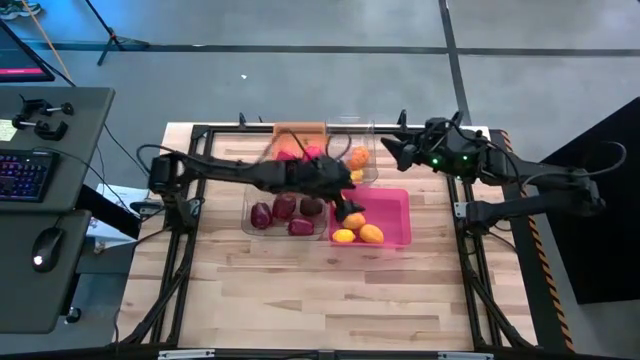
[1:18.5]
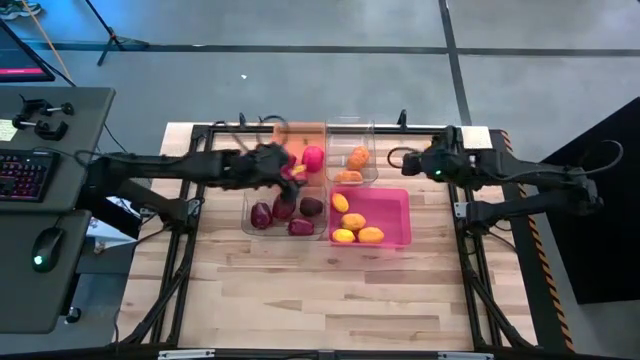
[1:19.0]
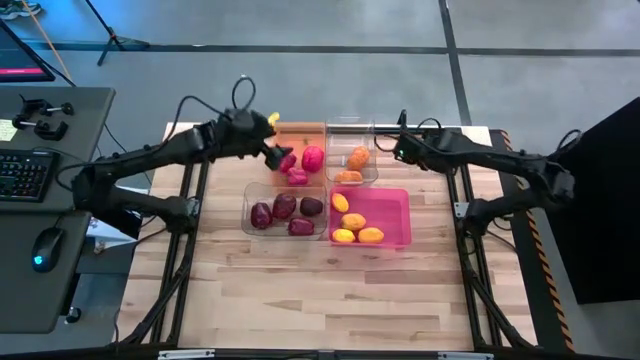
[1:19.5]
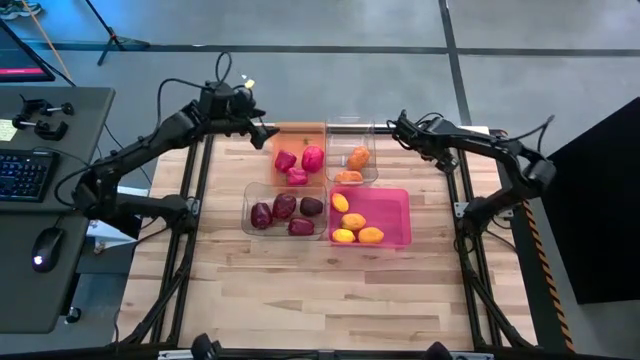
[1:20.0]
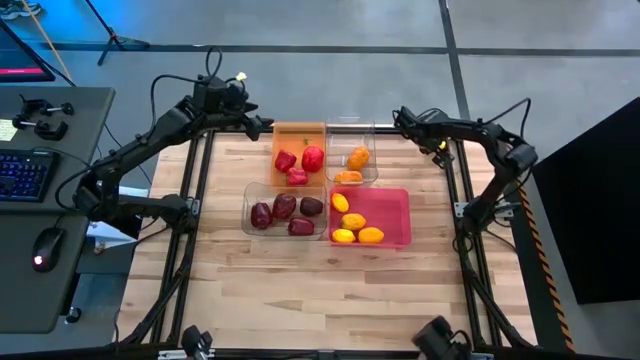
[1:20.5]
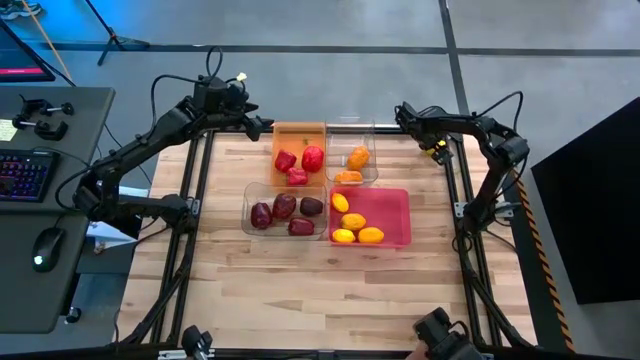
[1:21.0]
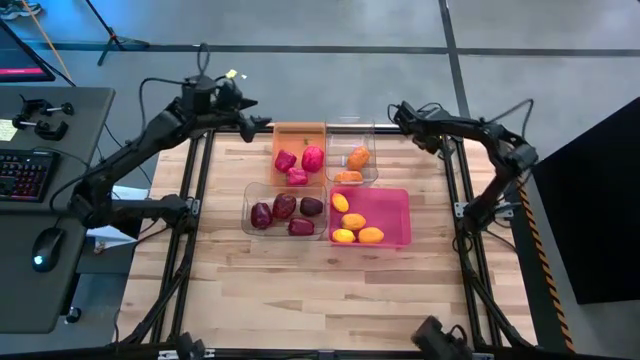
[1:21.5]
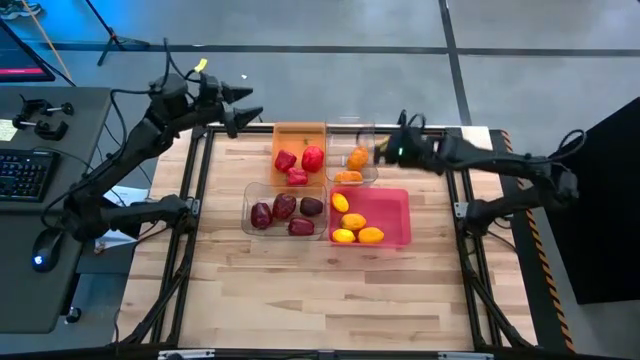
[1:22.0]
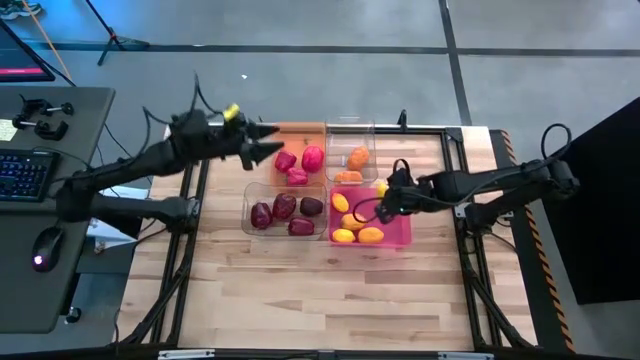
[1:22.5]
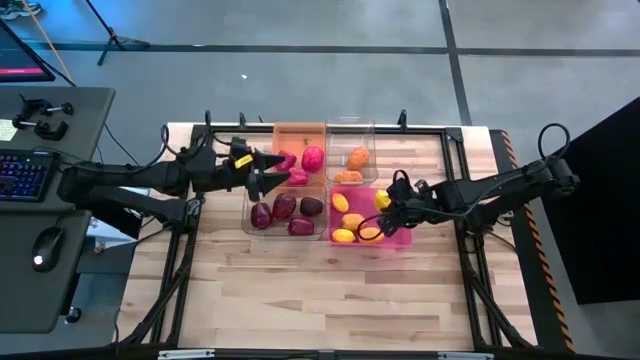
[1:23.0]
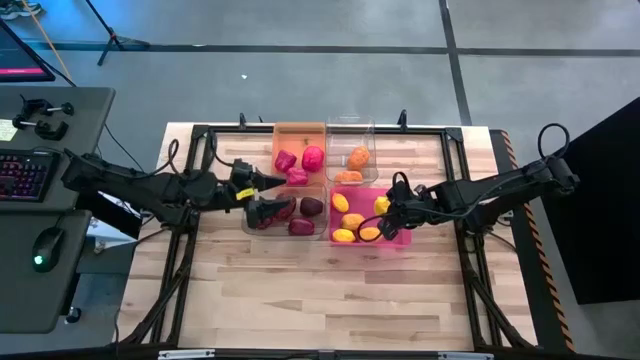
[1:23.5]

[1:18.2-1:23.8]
Task: Sort produce into baskets
Put the lemon into the pink bin

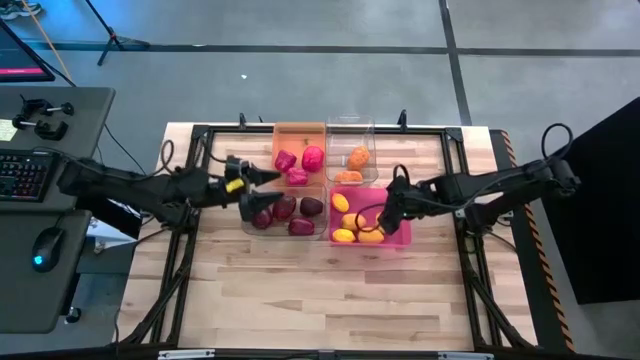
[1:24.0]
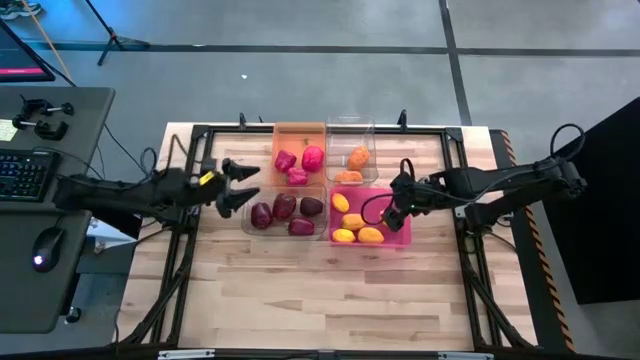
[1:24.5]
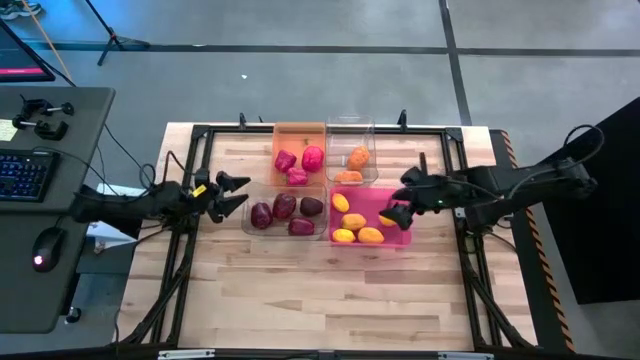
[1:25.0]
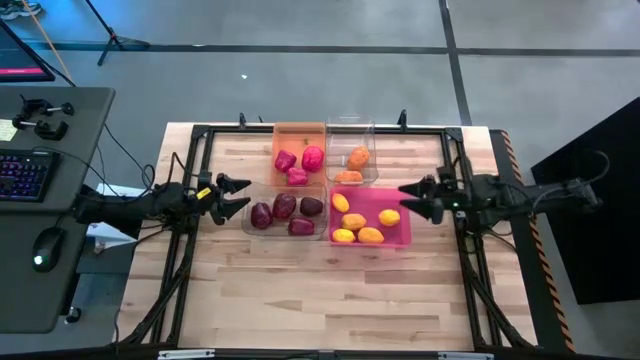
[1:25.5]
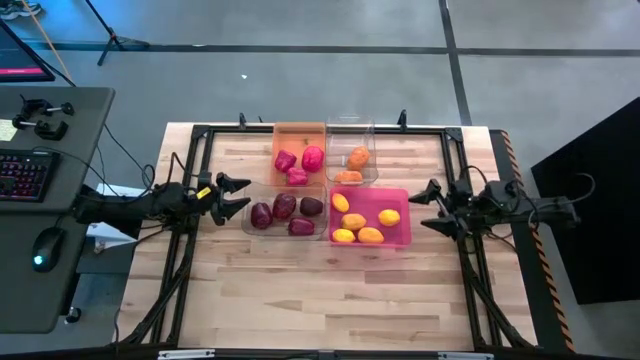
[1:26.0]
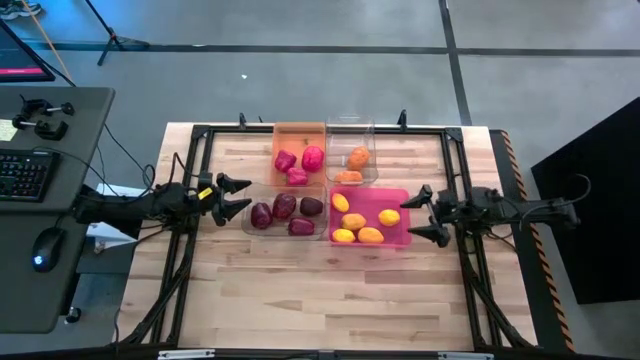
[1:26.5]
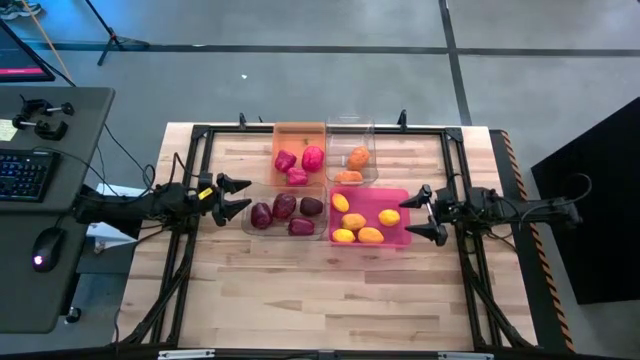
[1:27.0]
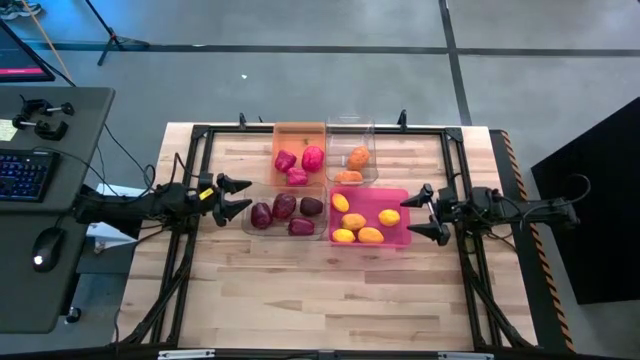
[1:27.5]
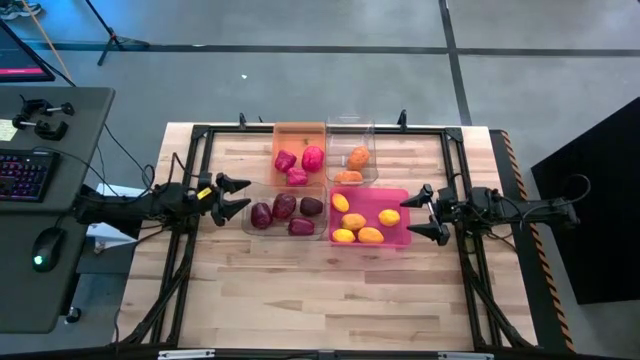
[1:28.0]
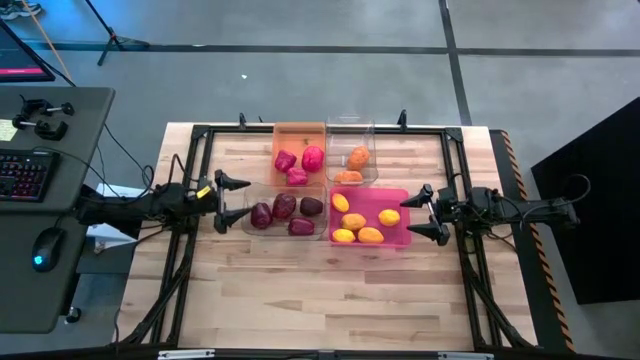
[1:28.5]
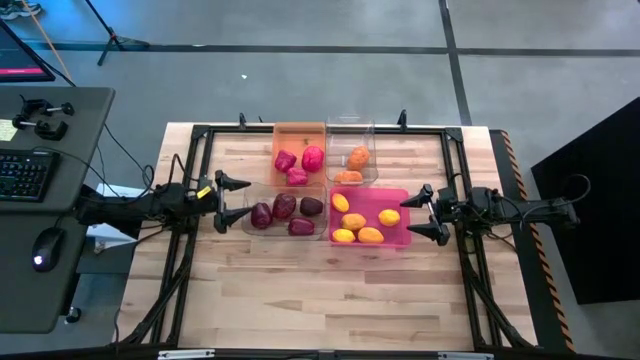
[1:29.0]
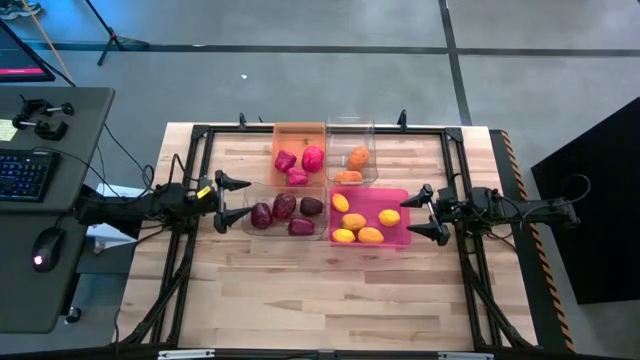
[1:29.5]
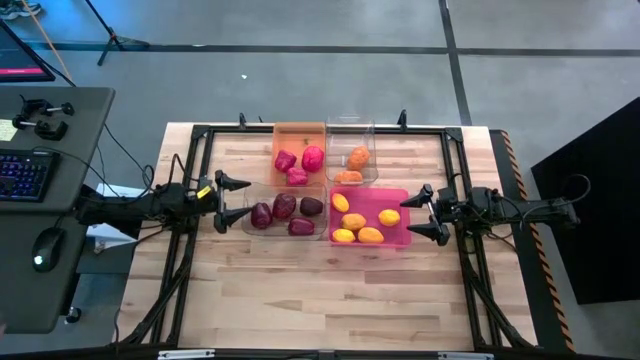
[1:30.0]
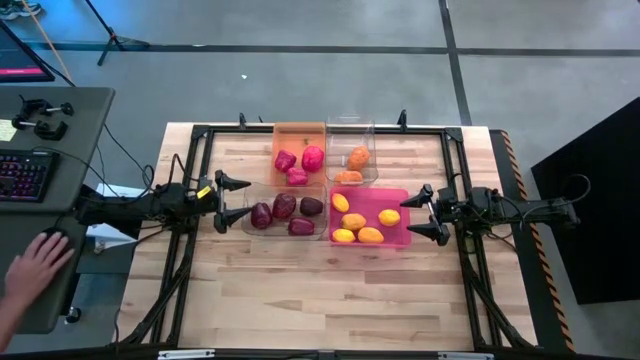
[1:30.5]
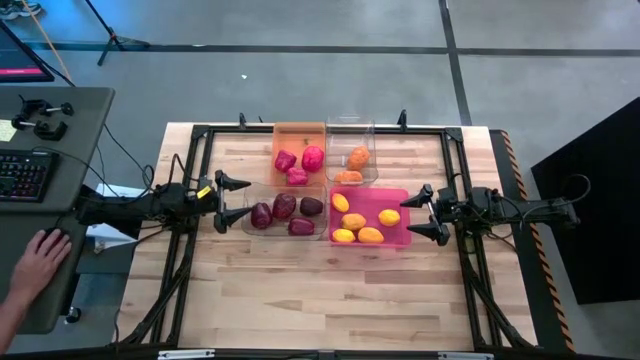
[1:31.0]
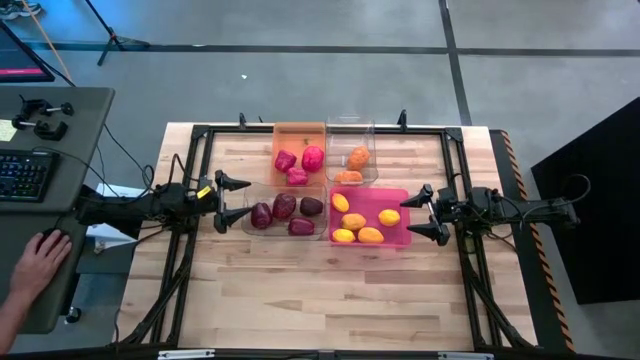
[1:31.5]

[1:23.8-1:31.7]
Return to Home Position

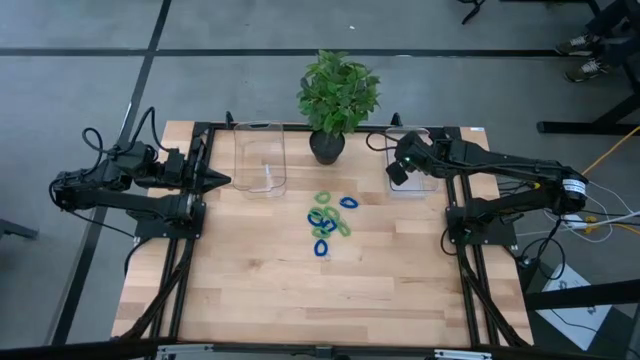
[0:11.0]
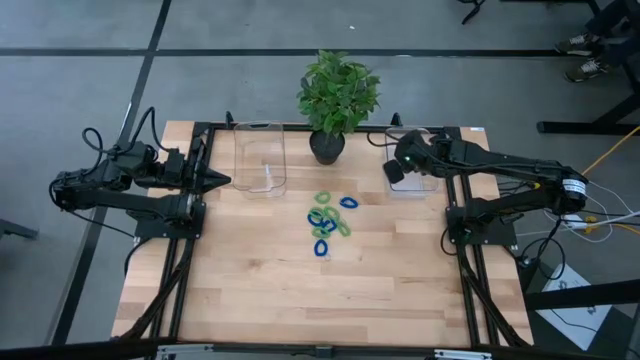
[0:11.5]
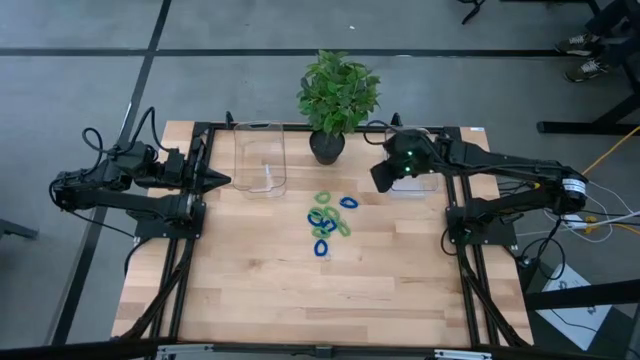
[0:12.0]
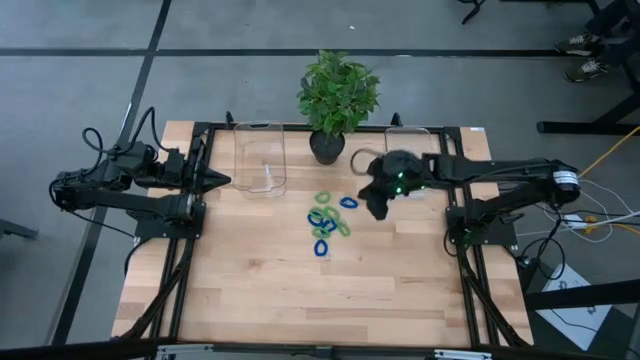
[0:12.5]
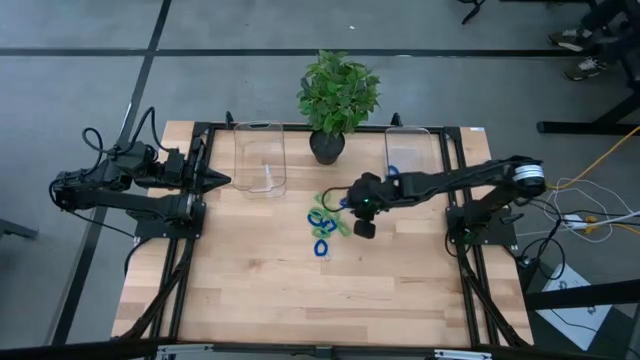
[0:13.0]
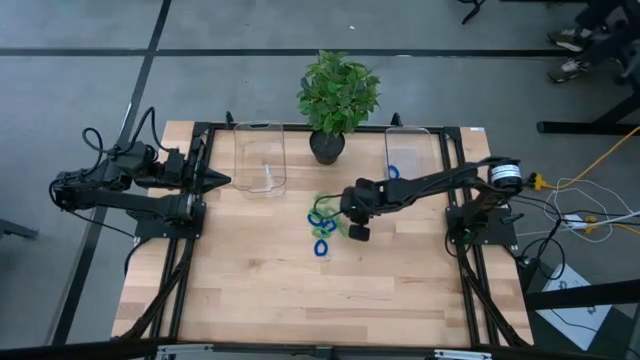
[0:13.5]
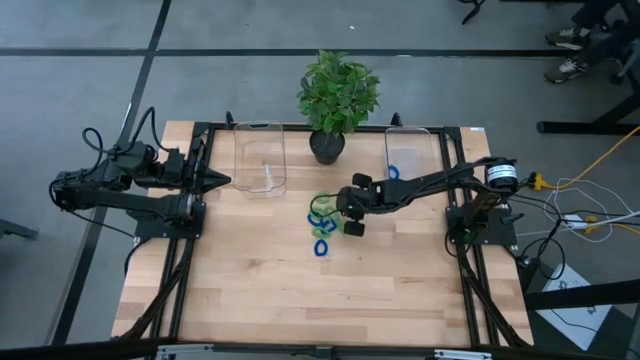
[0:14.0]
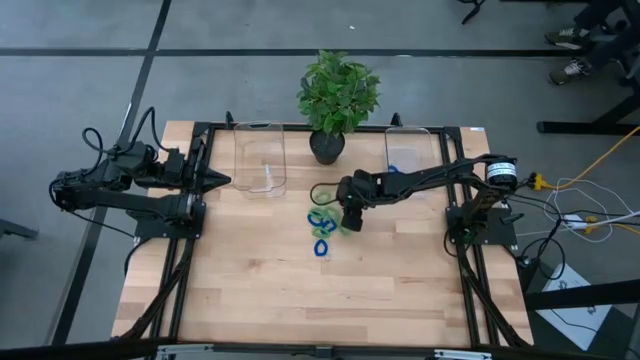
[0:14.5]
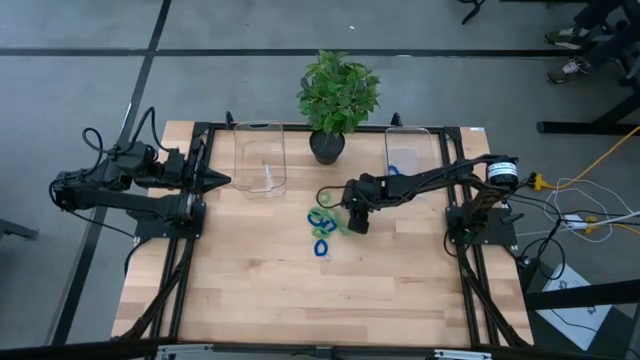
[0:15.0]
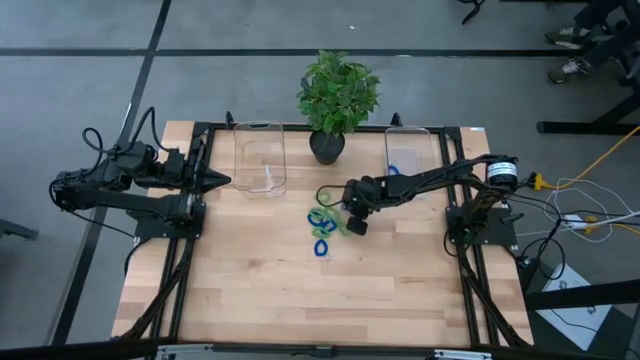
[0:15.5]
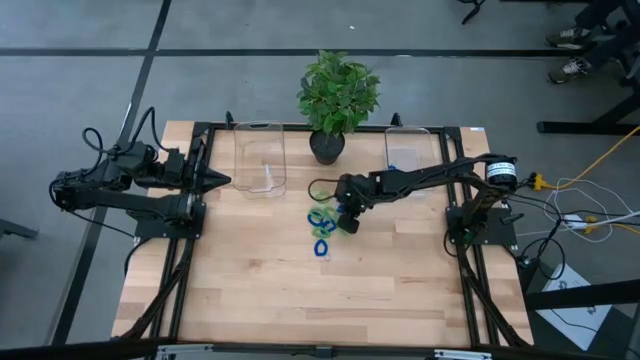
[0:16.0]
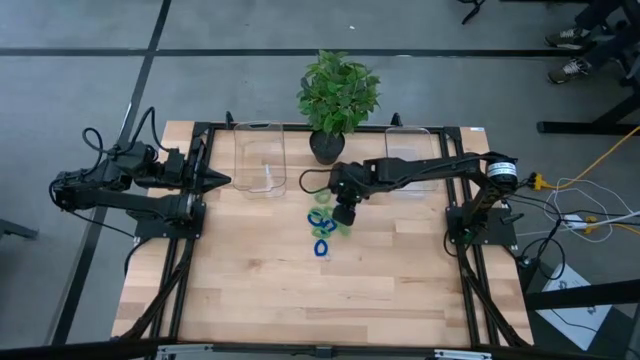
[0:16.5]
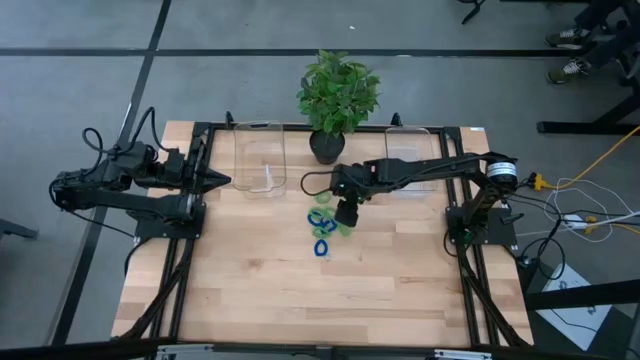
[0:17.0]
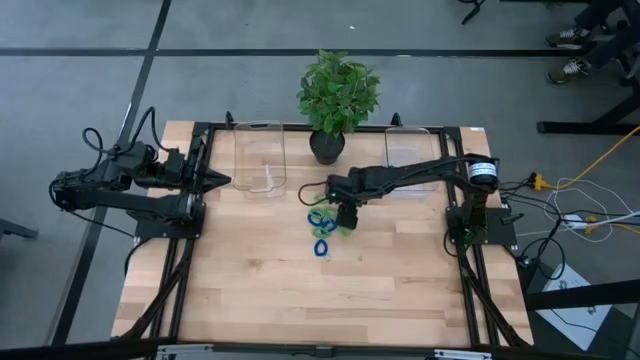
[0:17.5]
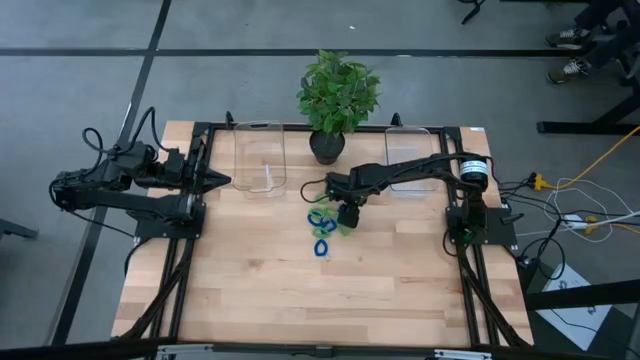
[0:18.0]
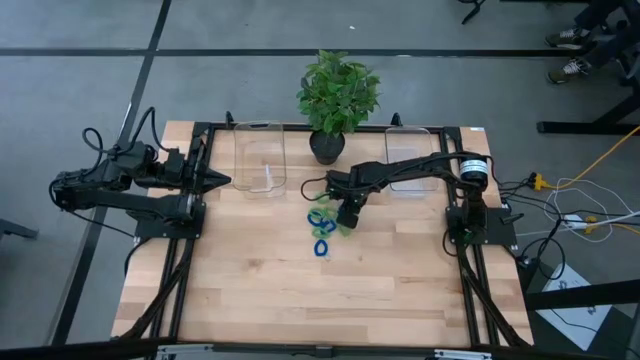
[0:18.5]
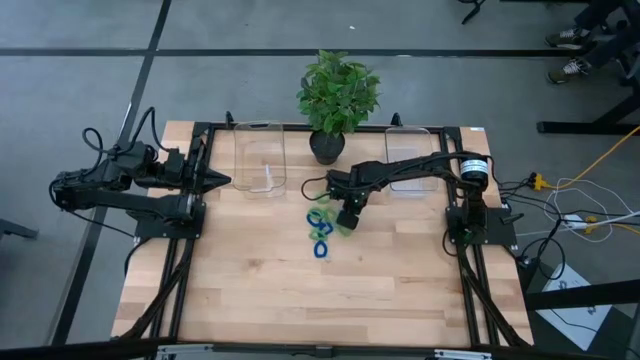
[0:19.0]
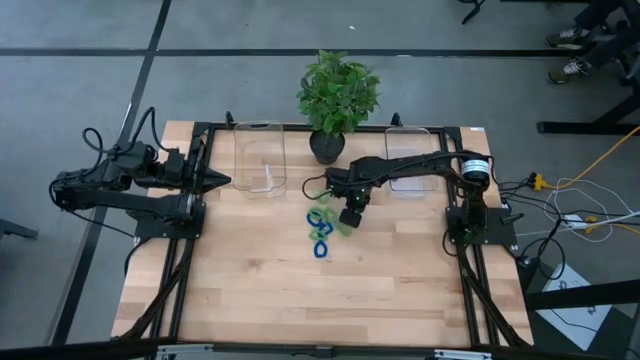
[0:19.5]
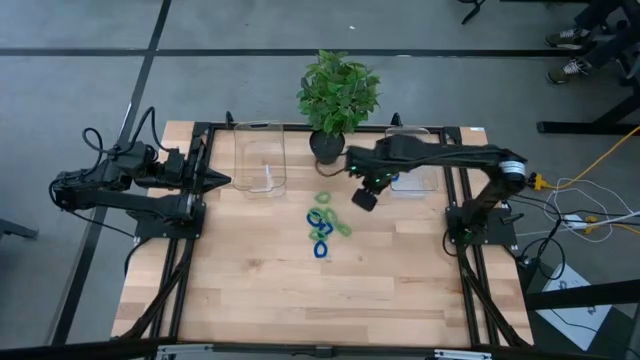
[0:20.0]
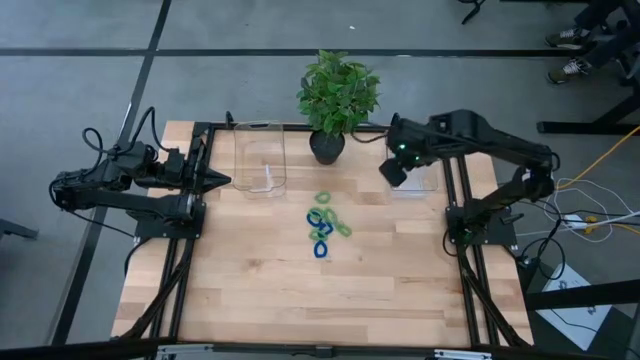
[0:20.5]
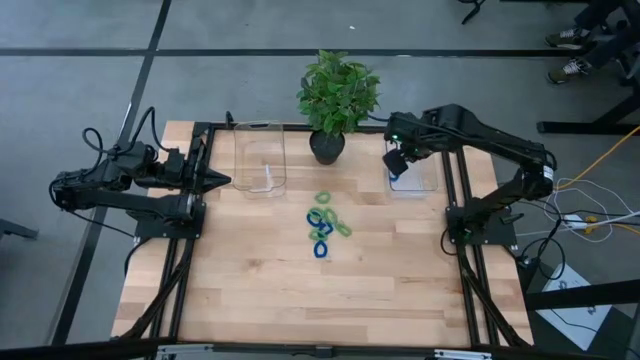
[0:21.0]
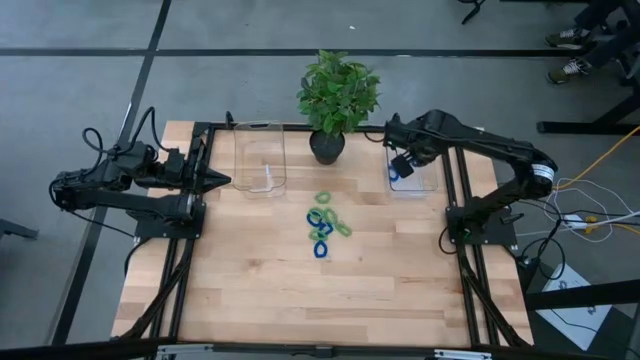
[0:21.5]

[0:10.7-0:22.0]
Task: Sort spring keychains
Put the blue spring keychain into the right transparent bin
